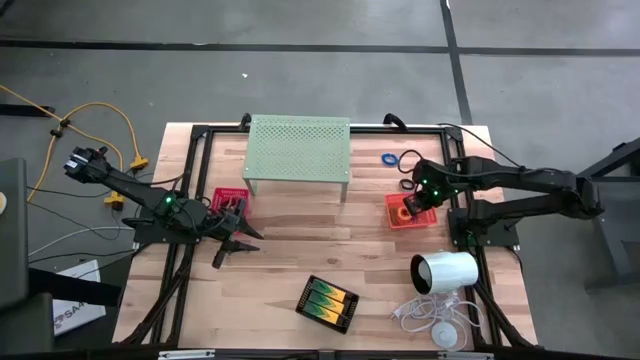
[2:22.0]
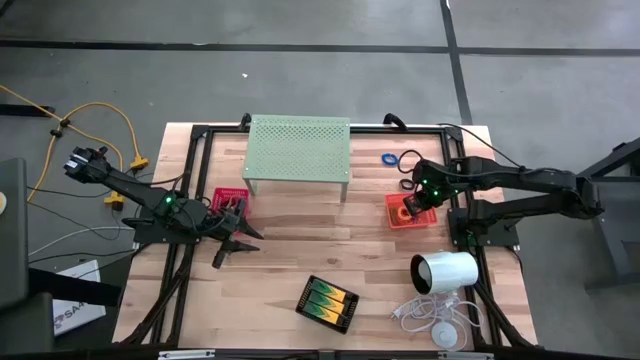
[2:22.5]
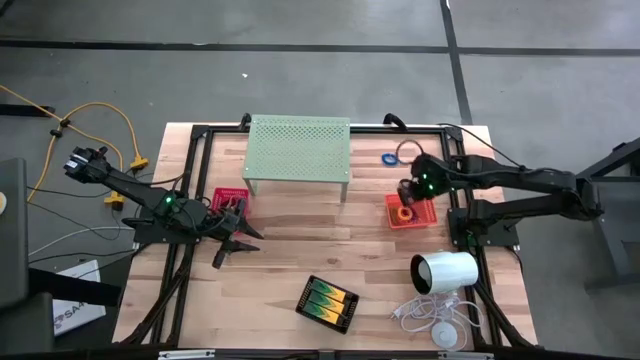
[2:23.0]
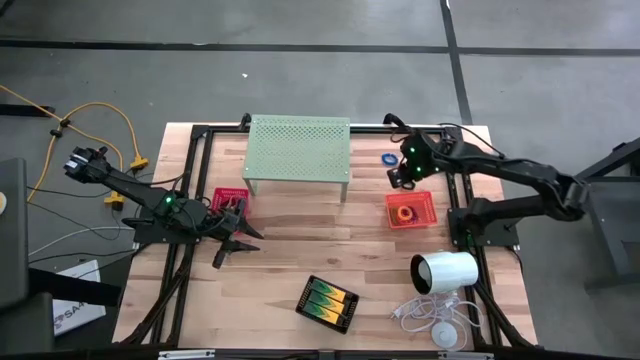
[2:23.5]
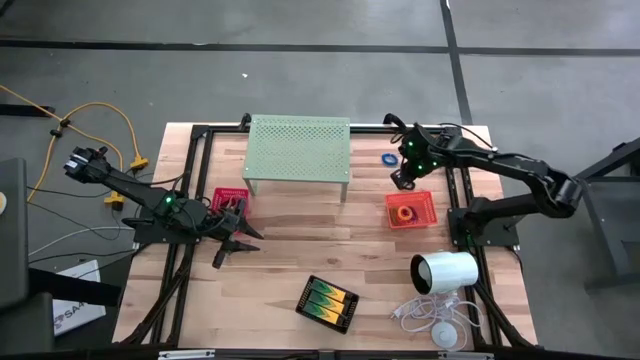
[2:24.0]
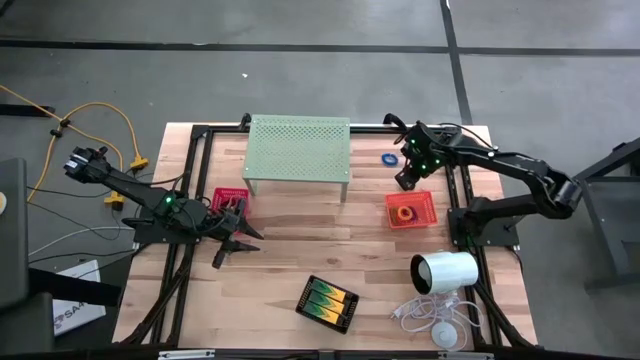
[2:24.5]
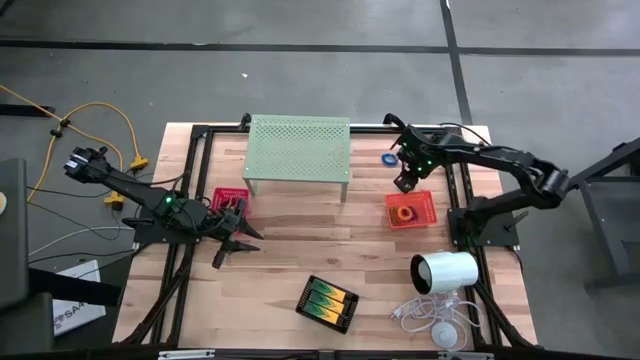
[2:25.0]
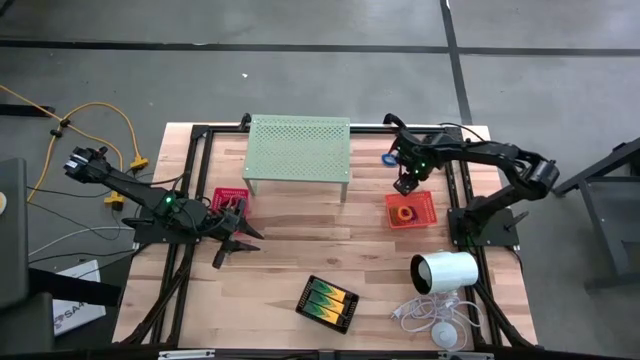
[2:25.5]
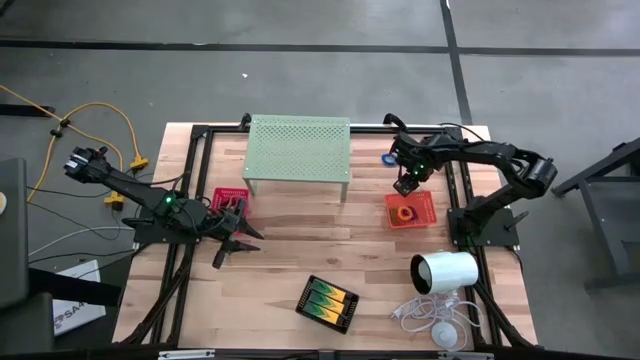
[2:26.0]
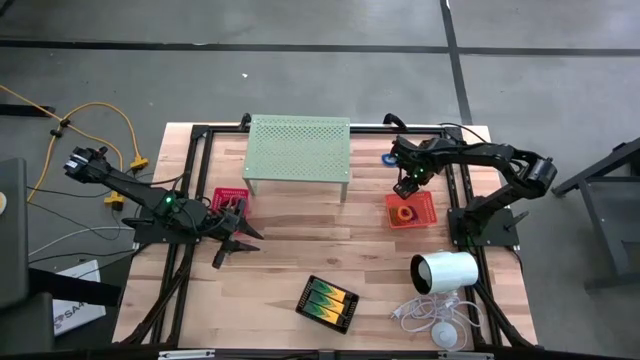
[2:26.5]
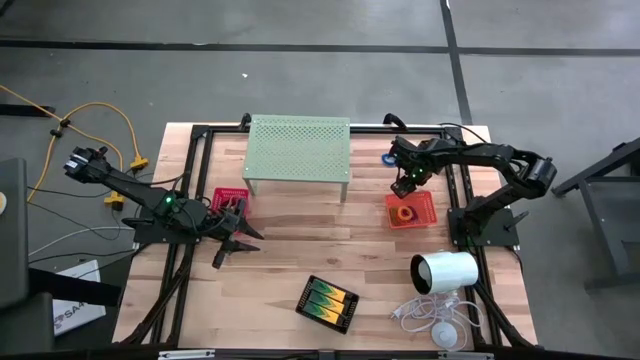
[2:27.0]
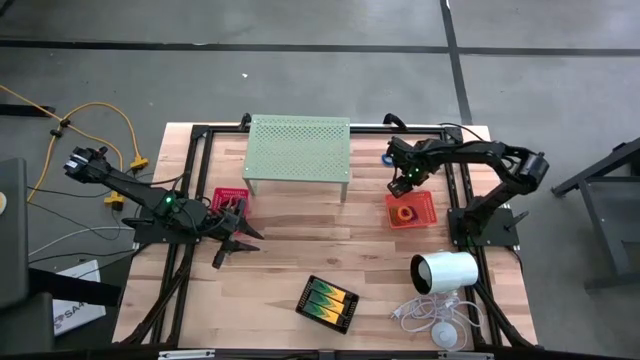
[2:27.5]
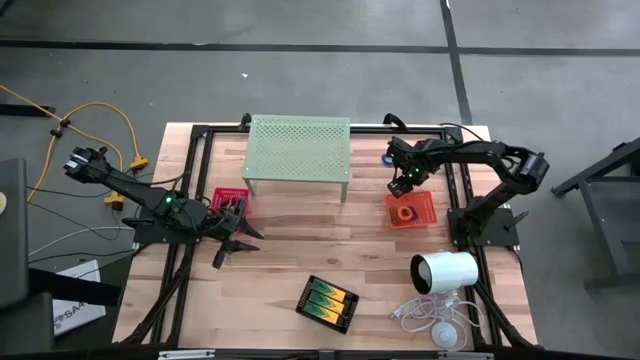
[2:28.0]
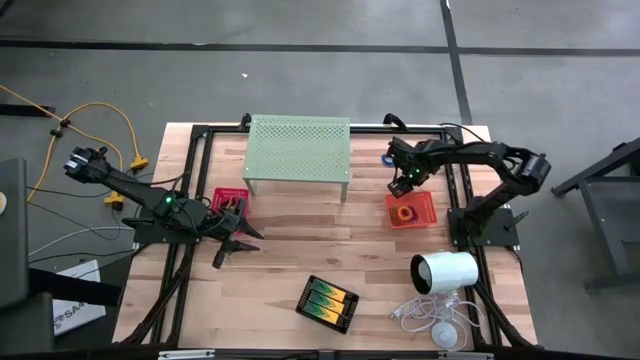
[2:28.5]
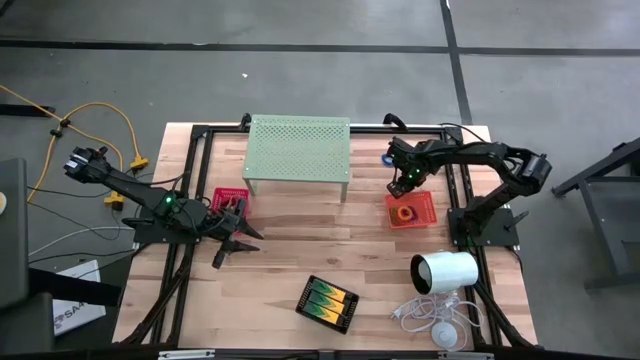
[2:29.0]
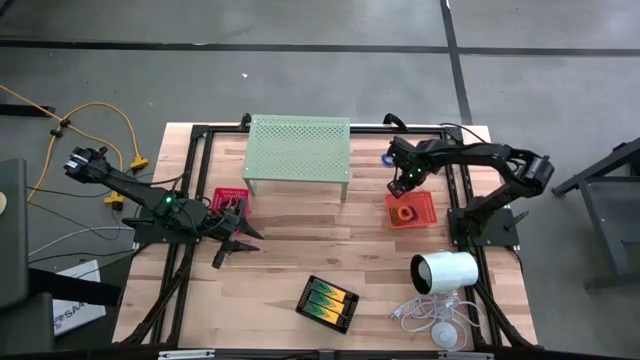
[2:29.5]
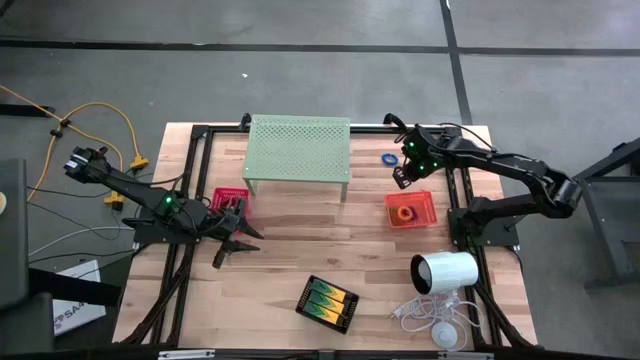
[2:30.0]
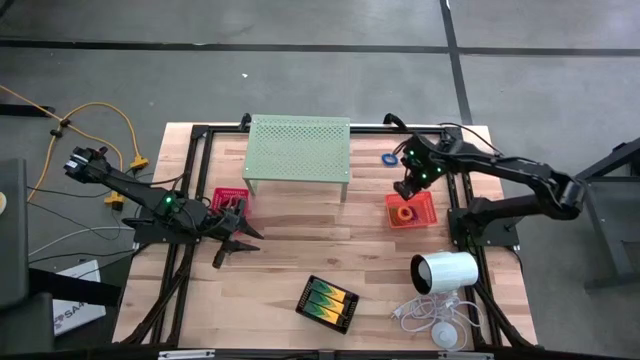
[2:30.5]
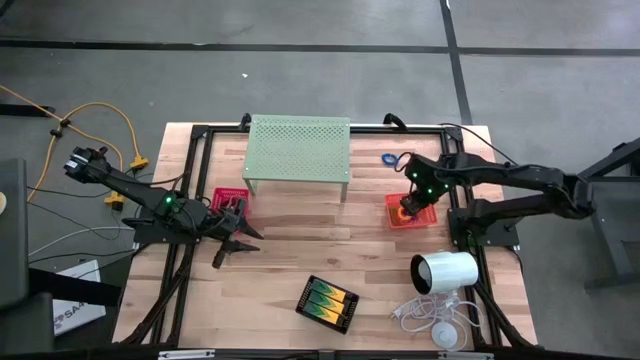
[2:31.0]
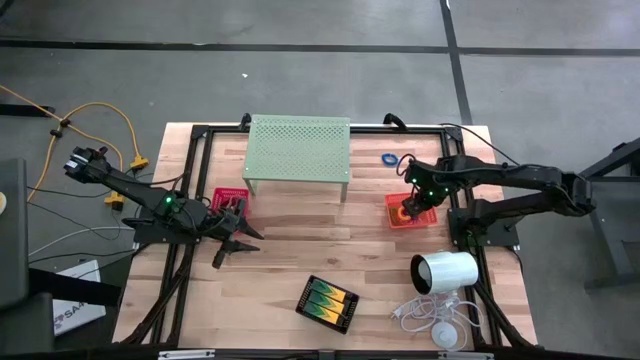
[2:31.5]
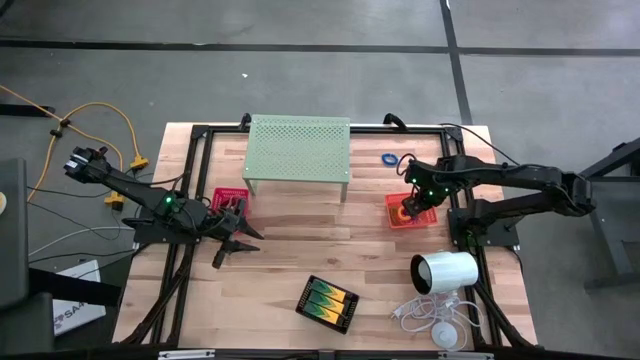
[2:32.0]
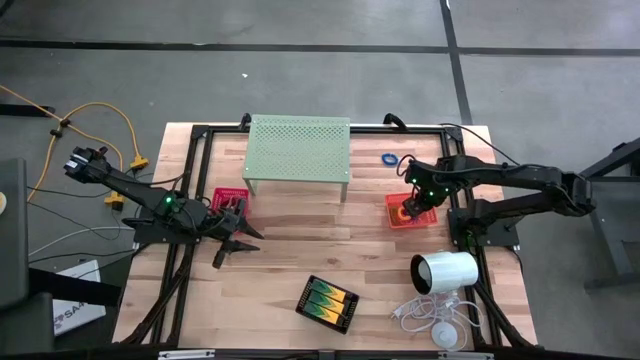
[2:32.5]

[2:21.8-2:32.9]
Task: Pick & Place Office Desk Supplies
Put the black spring keychain into the orange bin

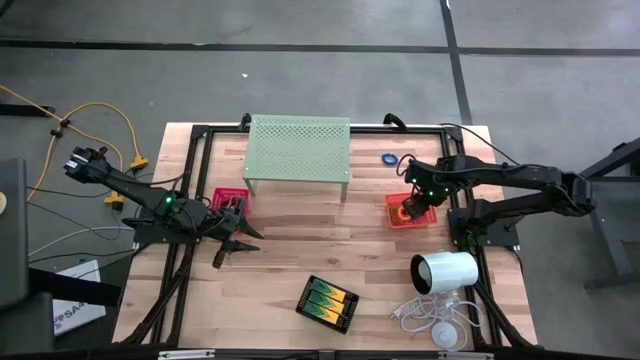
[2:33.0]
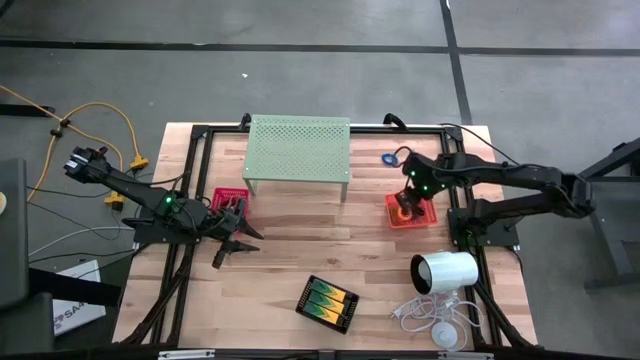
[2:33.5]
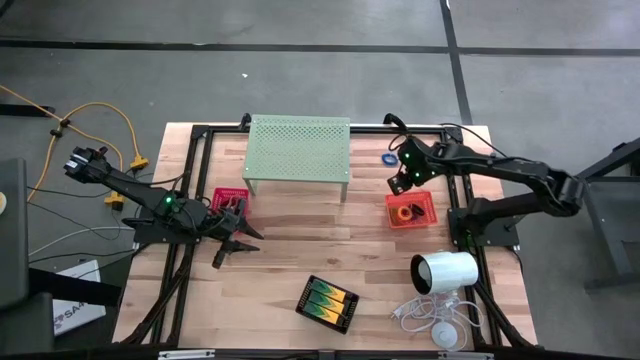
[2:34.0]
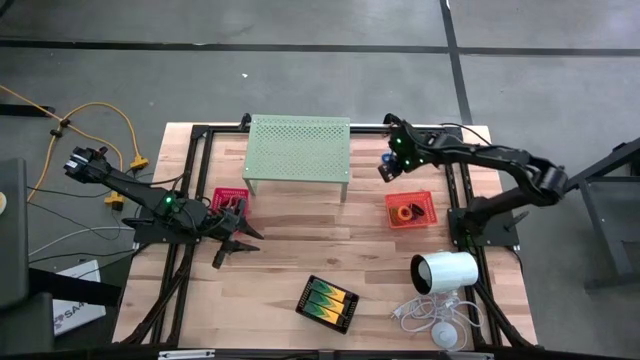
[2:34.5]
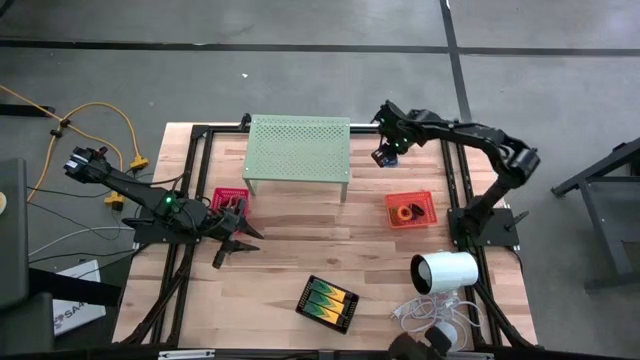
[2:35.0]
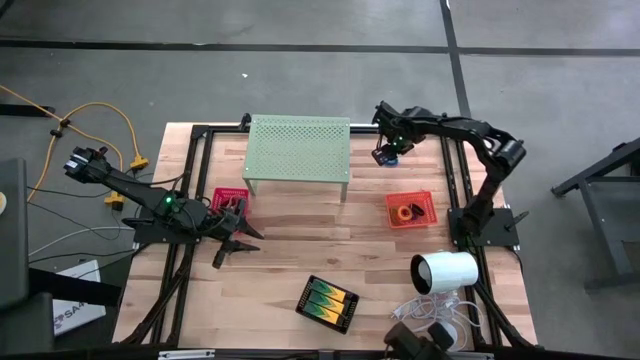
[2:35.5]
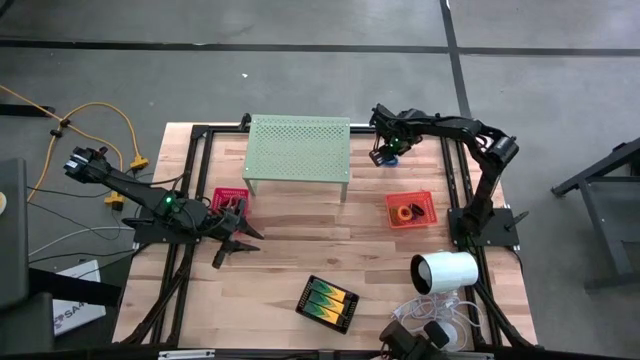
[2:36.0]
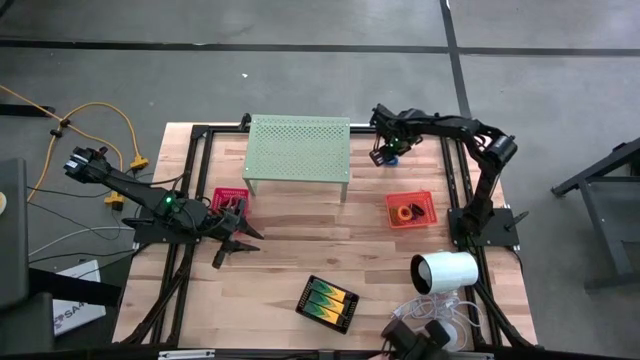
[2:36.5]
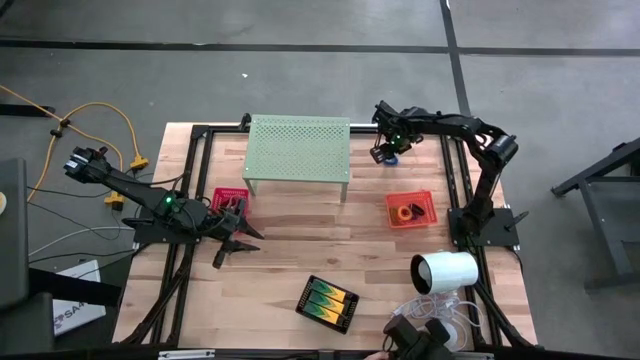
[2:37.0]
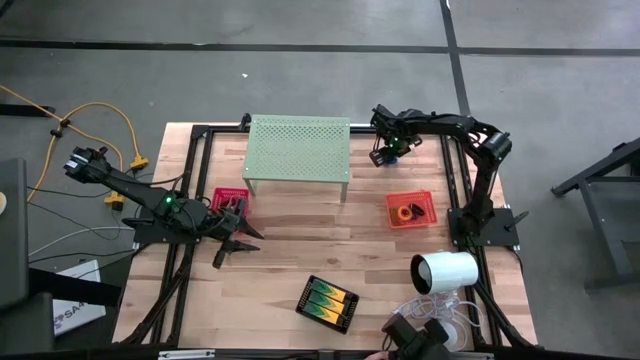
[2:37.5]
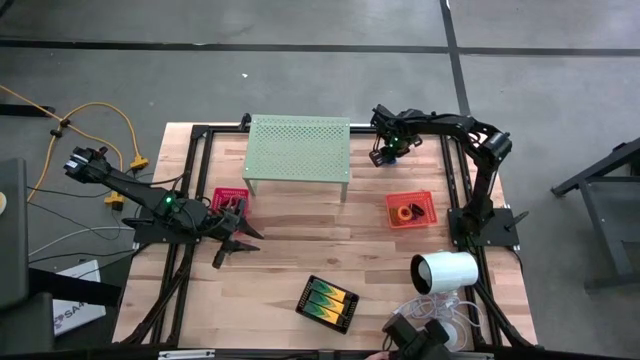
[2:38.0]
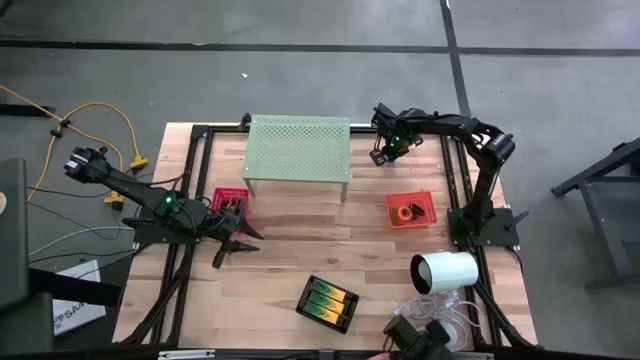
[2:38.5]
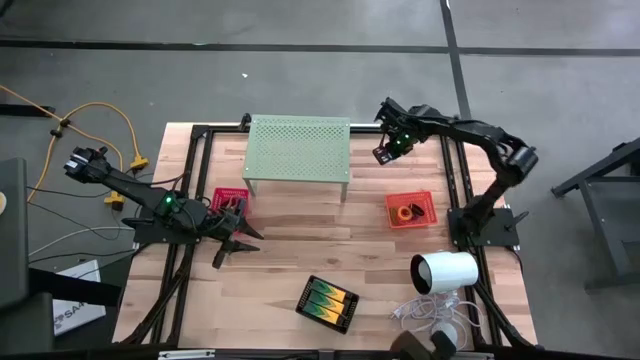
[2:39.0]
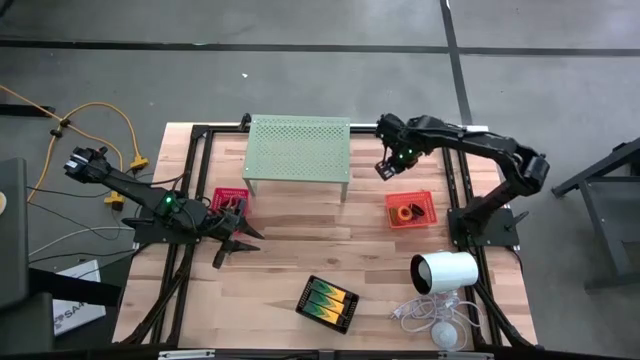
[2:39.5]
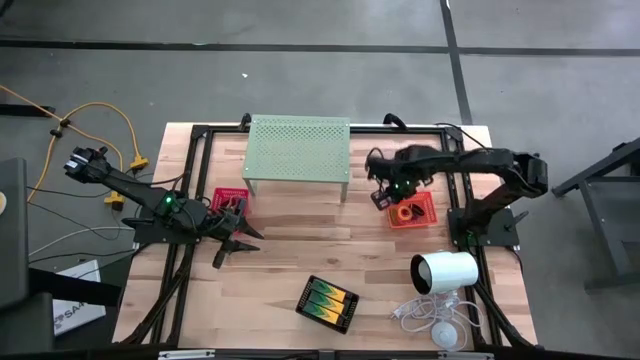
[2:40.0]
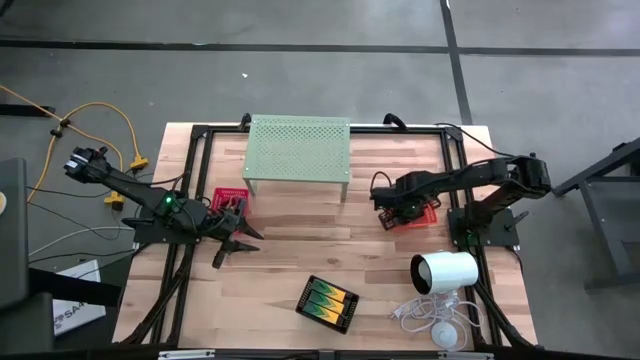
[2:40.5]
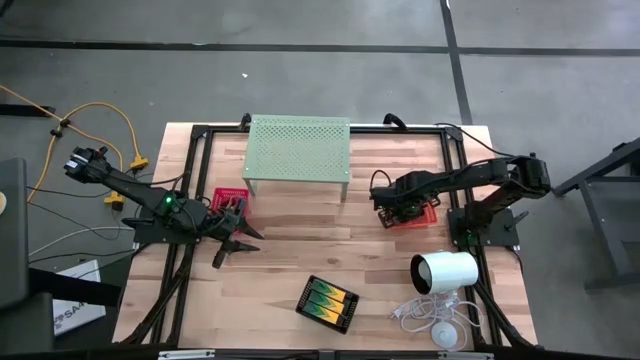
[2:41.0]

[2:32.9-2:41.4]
Put the blue spring keychain into the orange bin

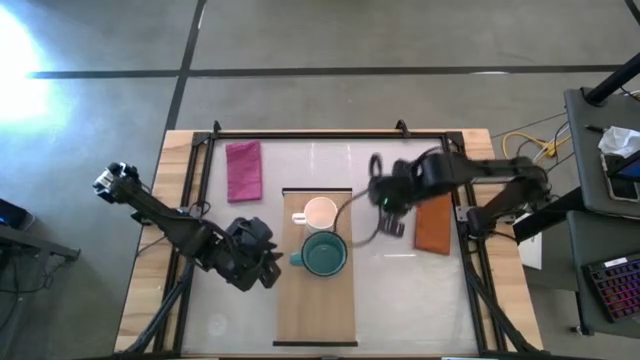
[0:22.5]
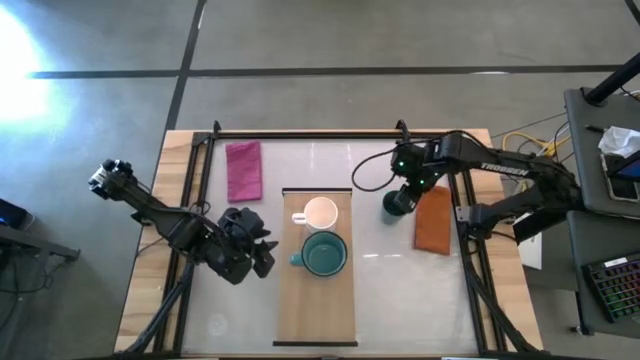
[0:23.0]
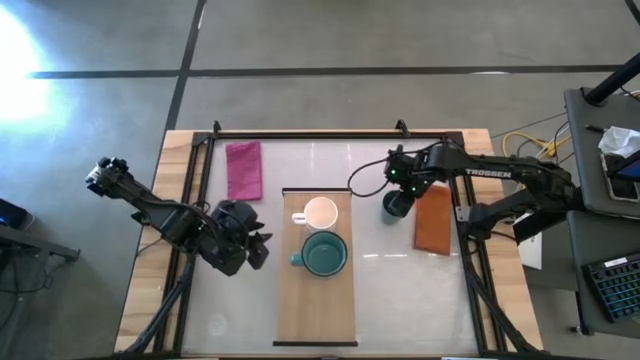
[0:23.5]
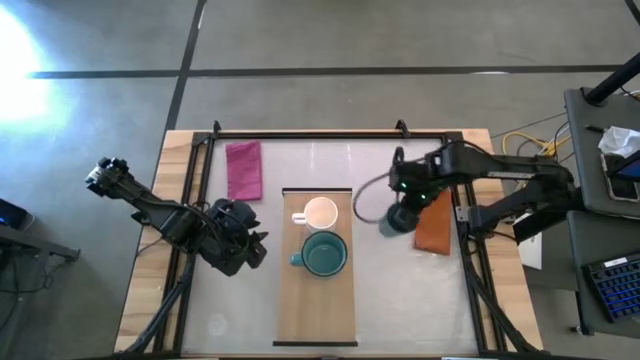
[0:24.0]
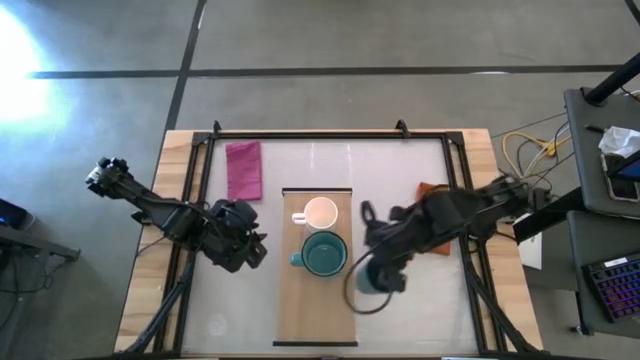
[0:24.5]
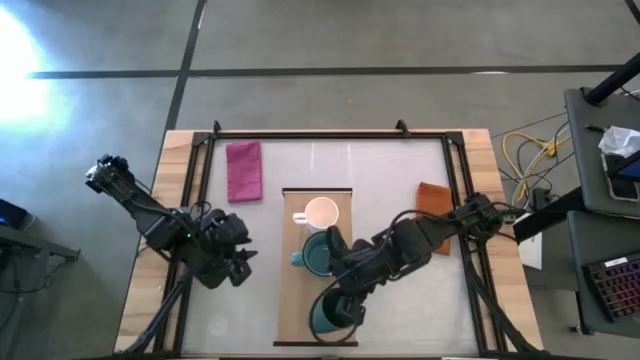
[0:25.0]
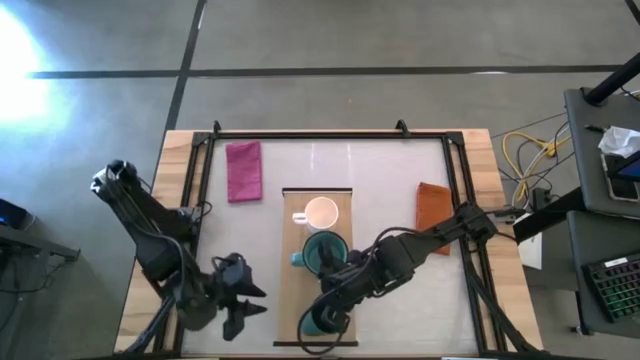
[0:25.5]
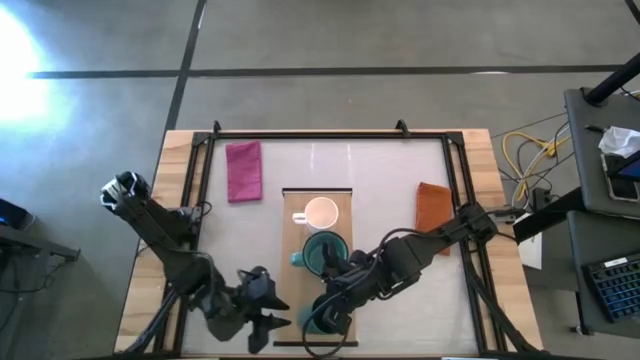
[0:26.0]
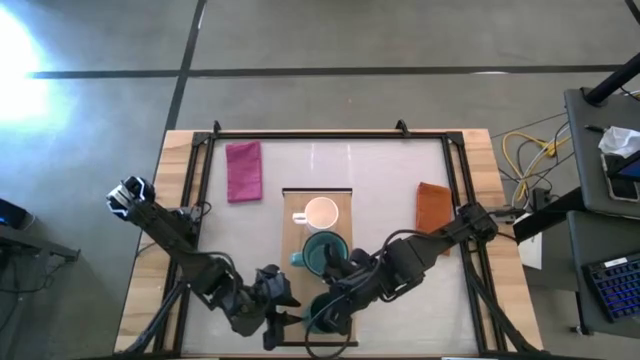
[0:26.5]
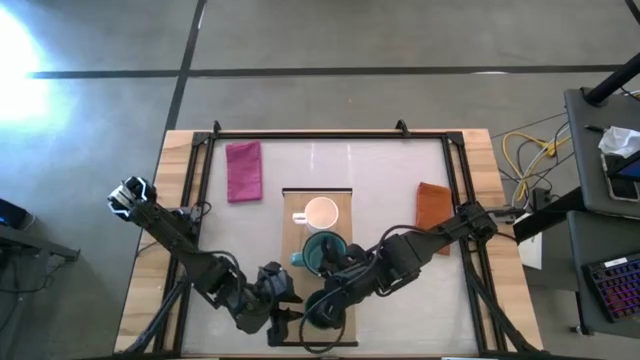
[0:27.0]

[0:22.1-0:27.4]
Task: Stack small to large cups/mugs on shelf
Put the light blue cup on the shelf
